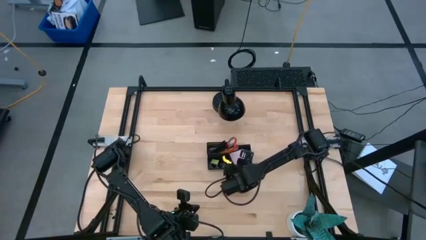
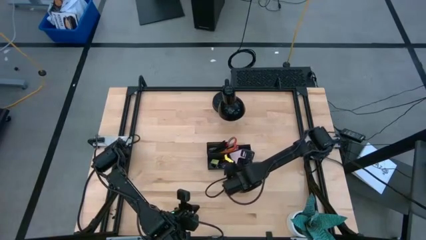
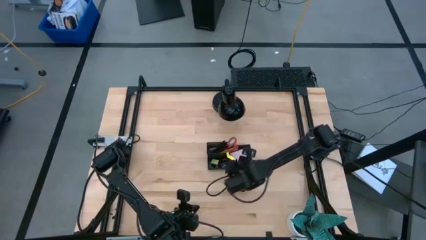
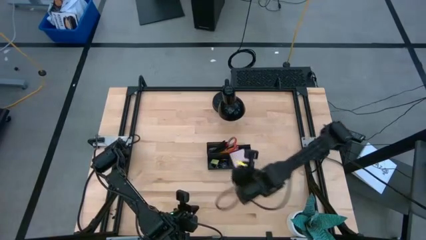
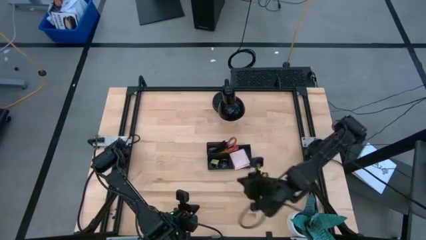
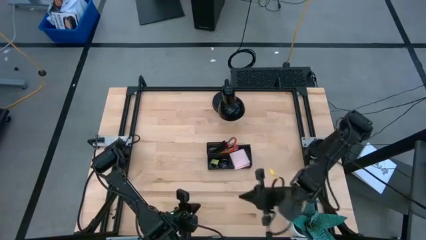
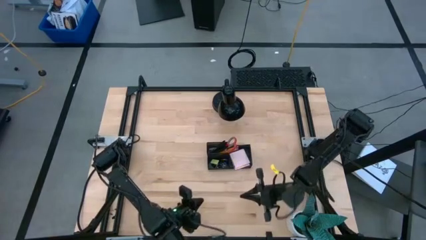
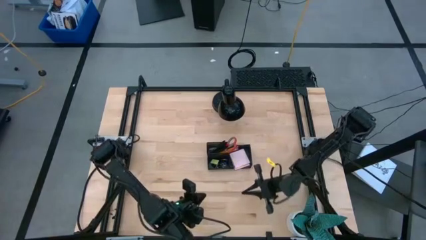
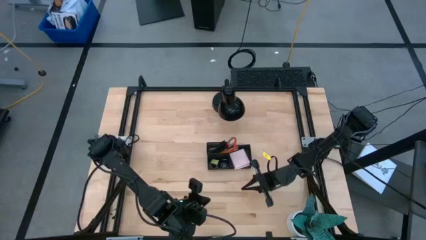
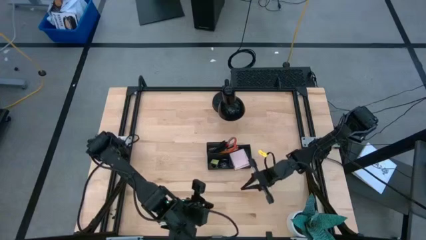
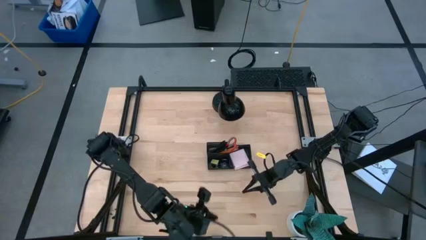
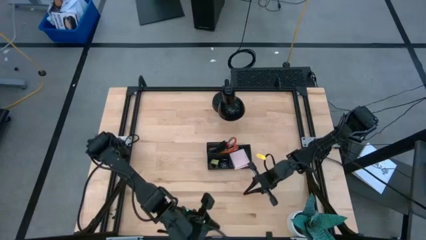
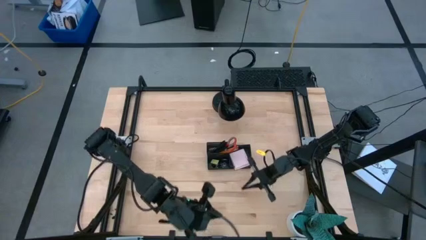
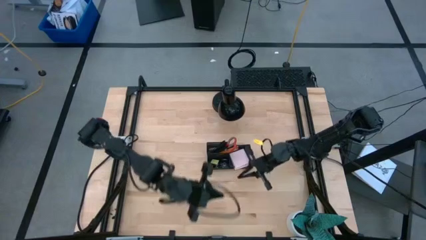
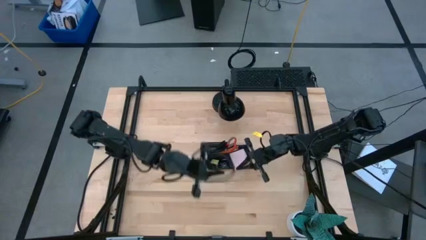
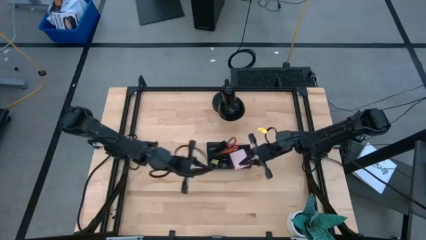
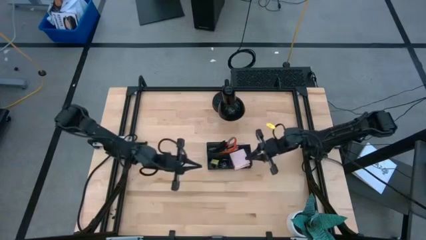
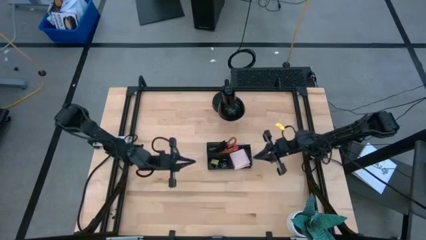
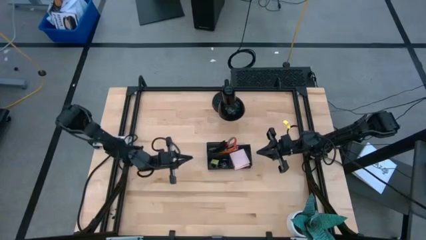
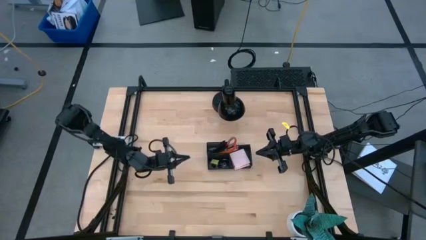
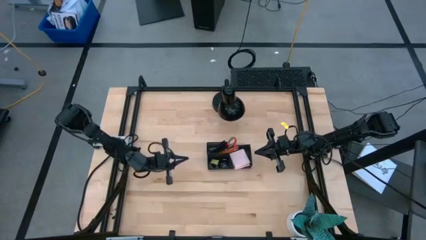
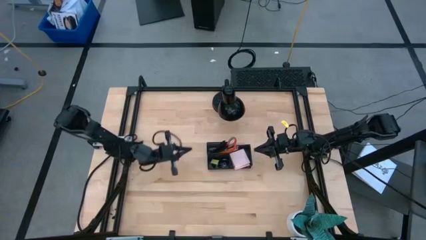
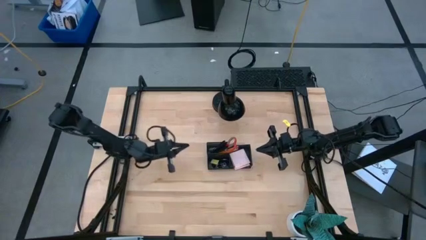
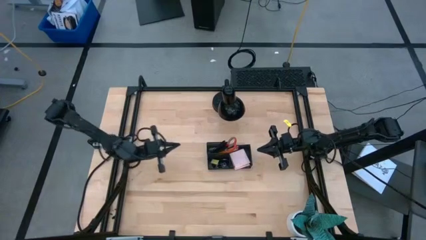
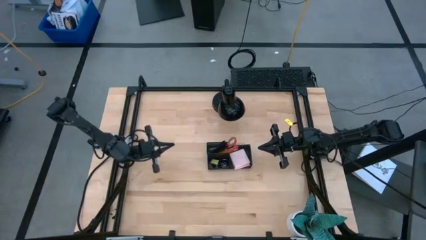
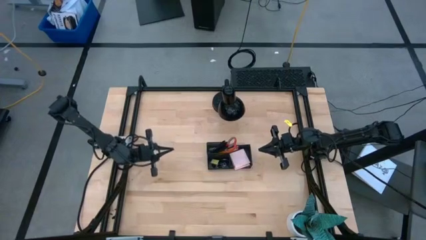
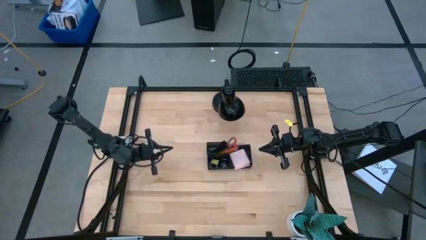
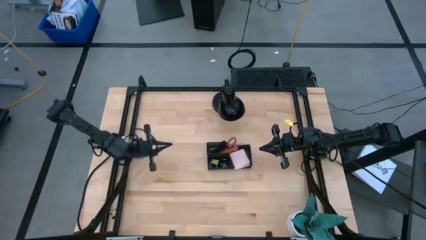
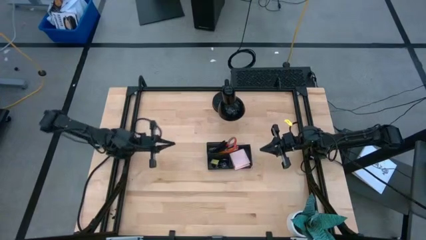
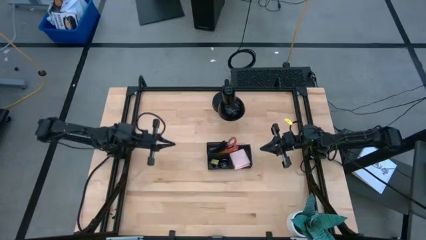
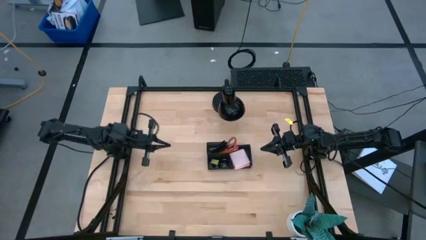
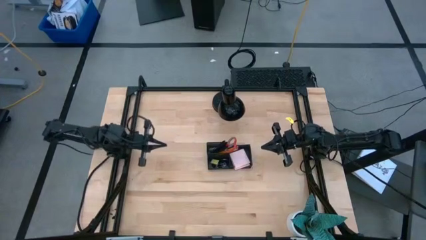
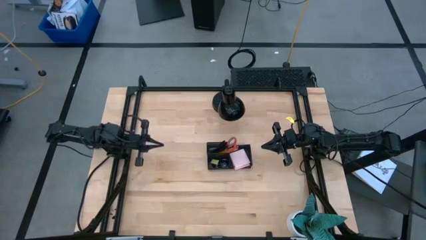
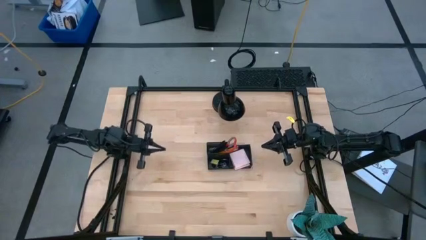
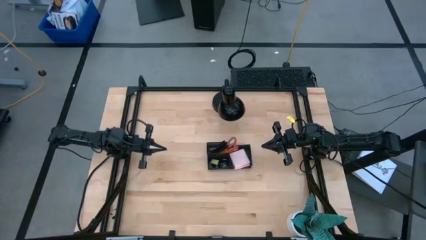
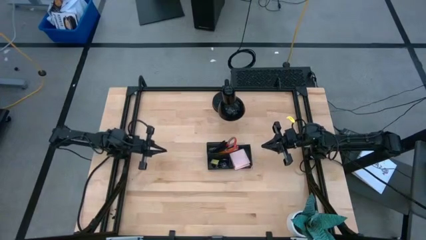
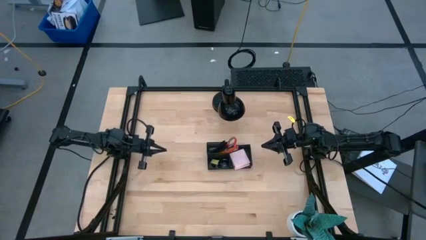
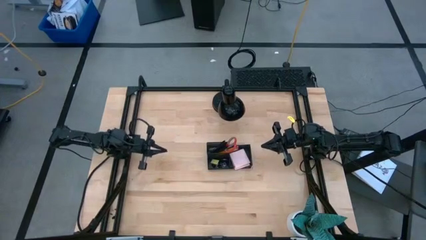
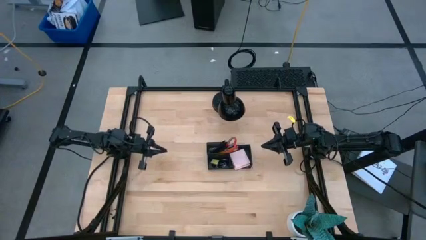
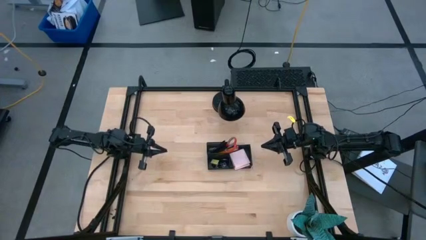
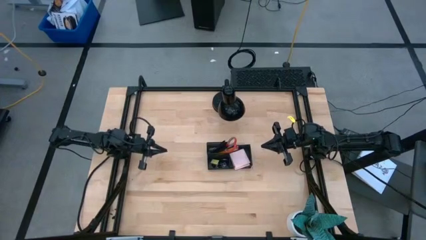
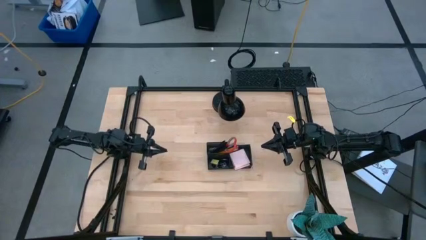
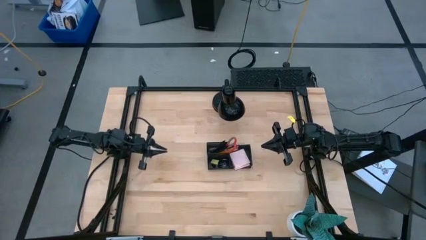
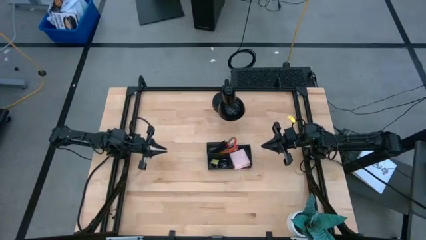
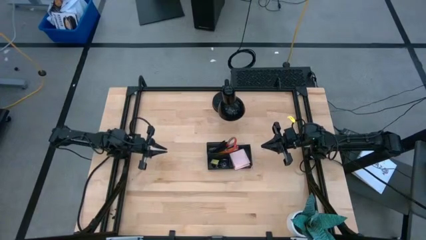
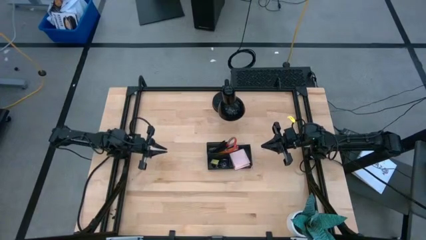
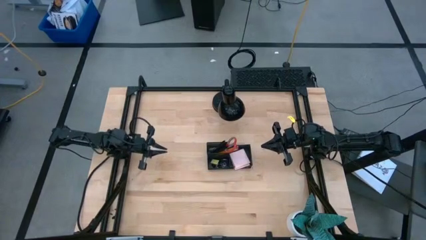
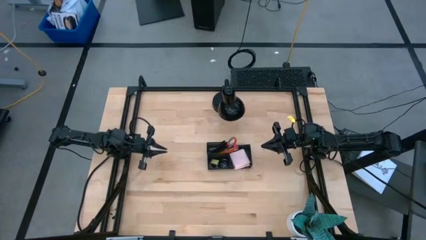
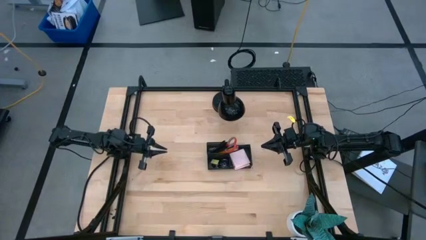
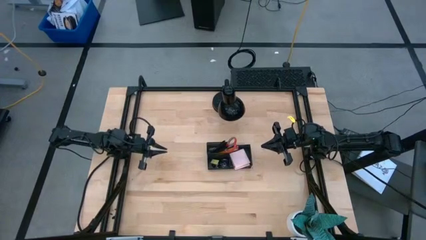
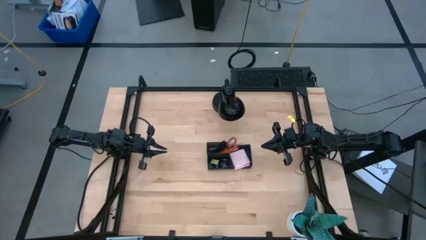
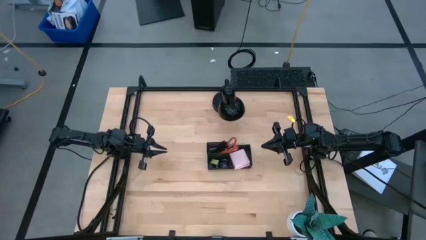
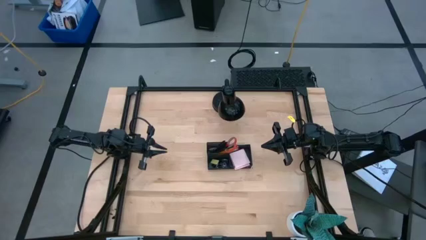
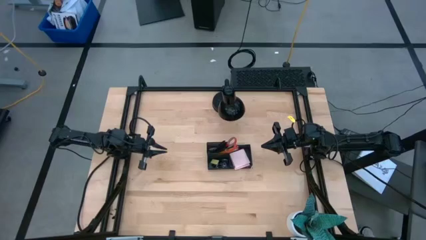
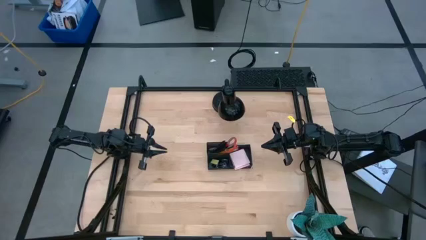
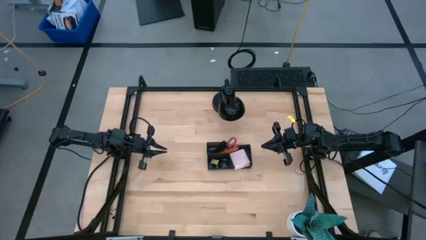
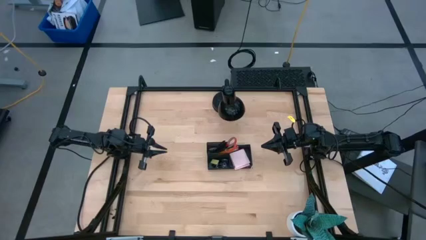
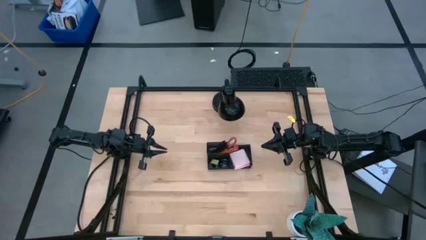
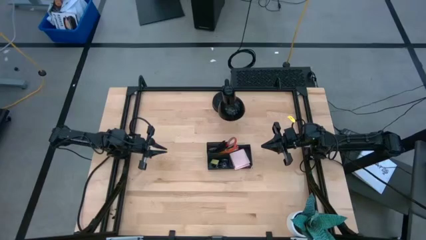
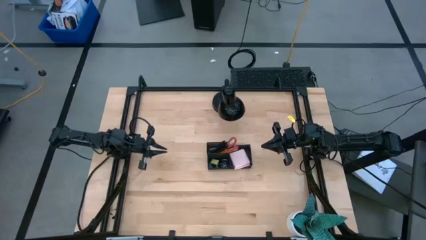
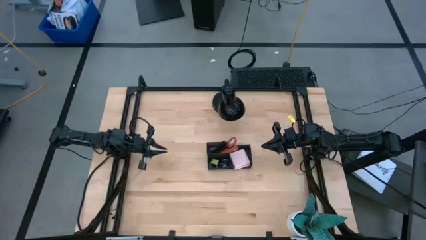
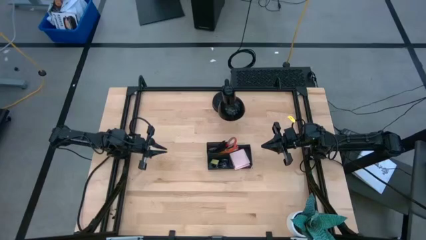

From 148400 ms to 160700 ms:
Task: Pick and place office supplies into organizer
Return to Home Position

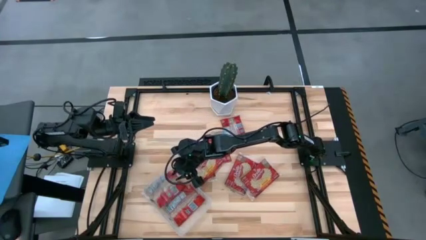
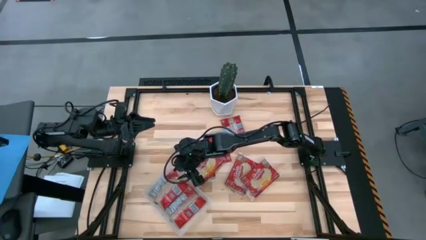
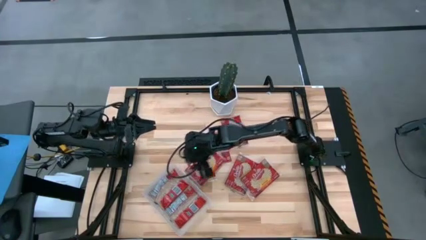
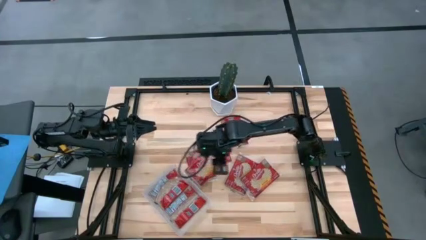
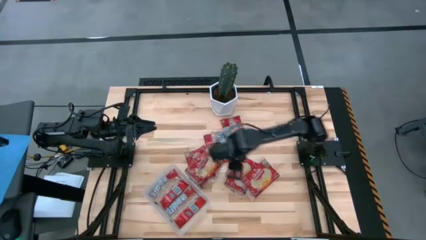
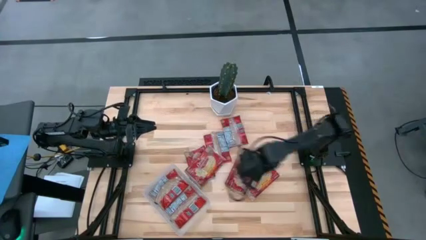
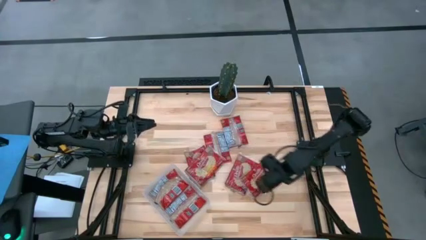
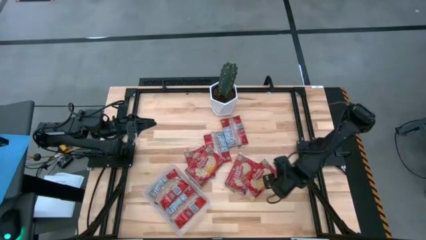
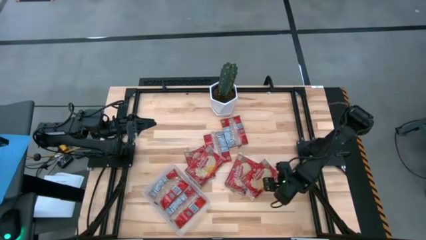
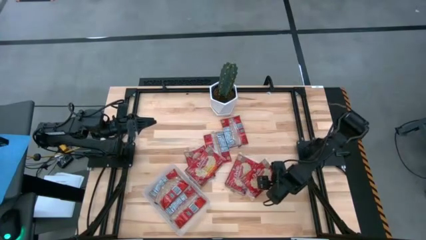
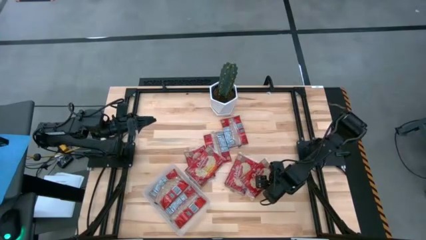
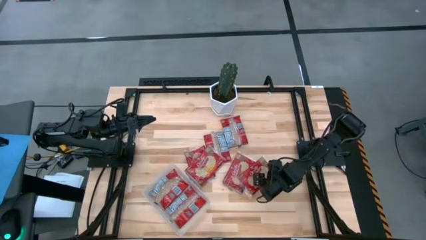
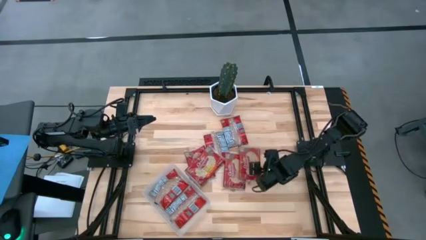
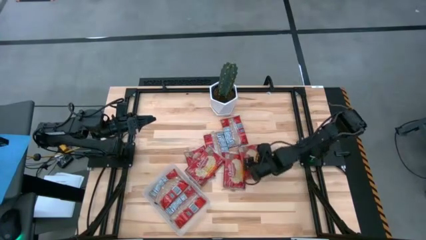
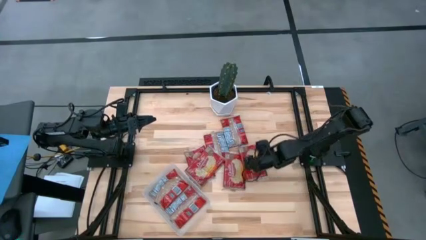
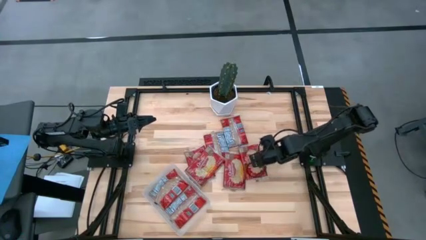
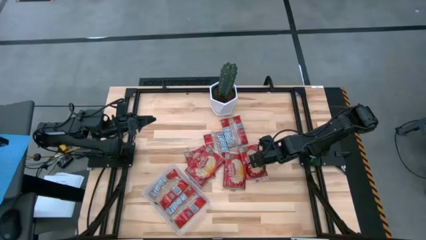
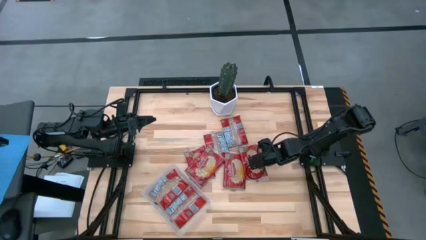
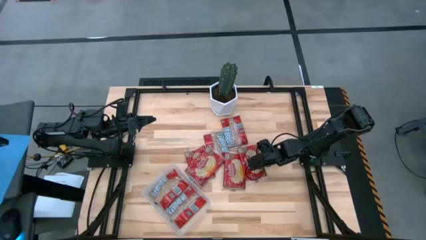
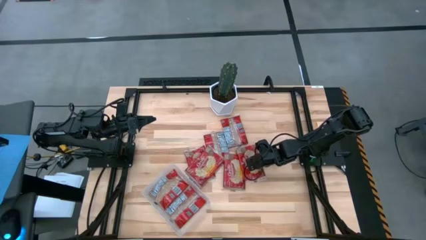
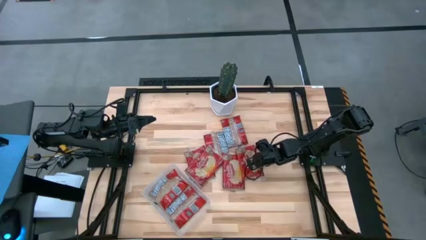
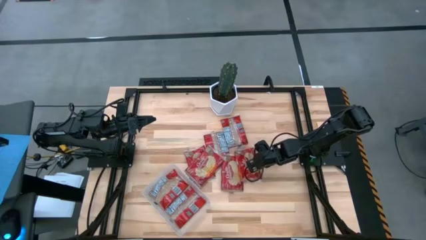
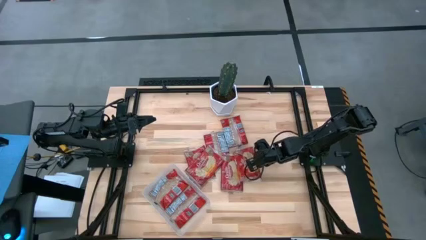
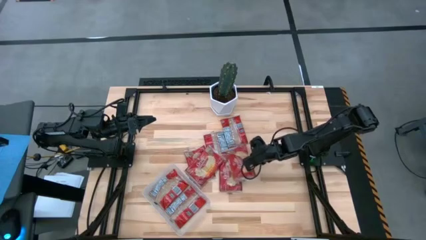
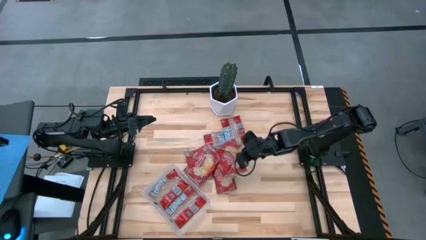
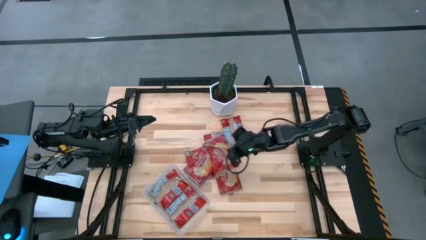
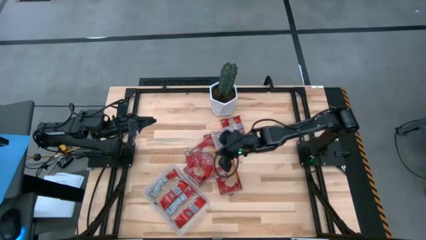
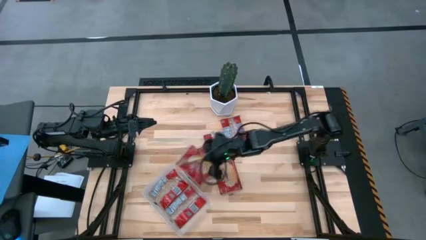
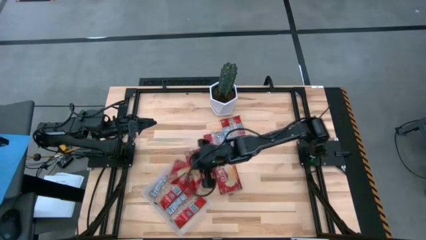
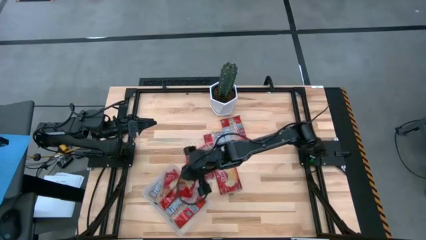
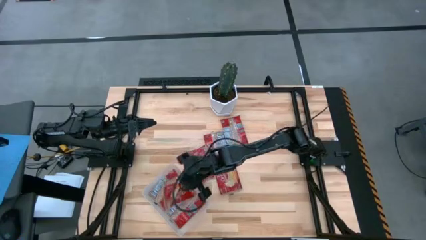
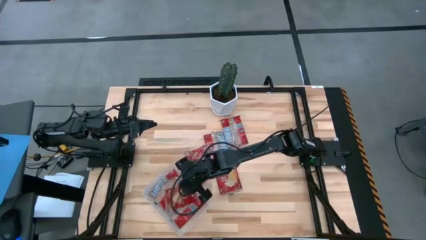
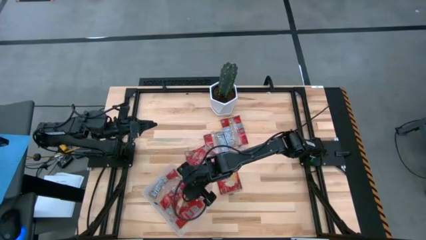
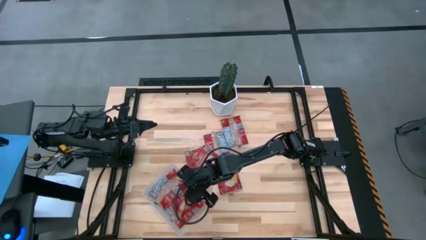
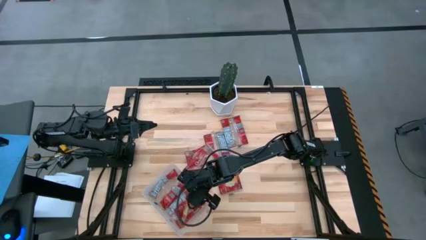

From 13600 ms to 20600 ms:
Task: Sort popcorn bags into baskets
Put the red popcorn bag into the transparent bin
